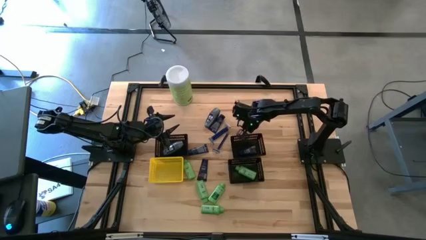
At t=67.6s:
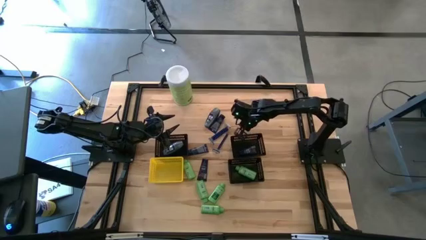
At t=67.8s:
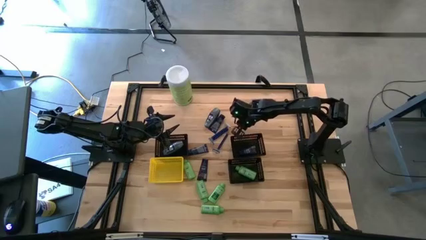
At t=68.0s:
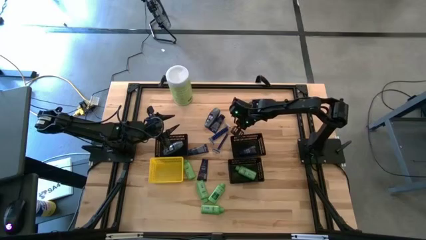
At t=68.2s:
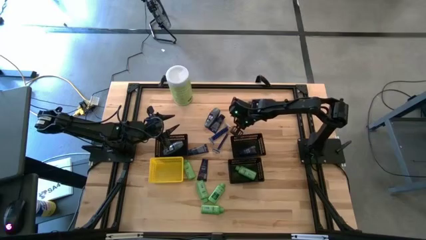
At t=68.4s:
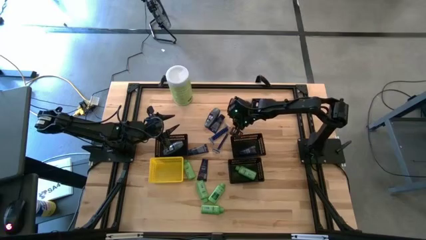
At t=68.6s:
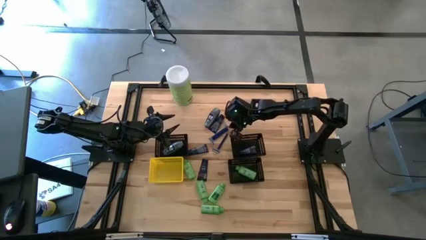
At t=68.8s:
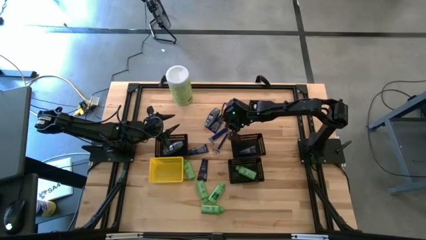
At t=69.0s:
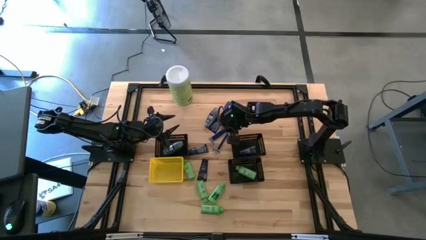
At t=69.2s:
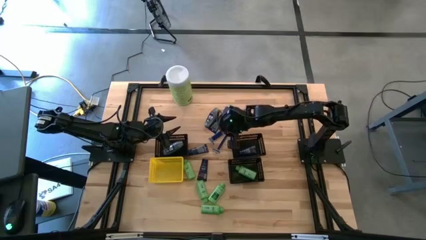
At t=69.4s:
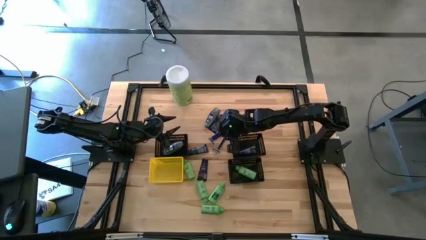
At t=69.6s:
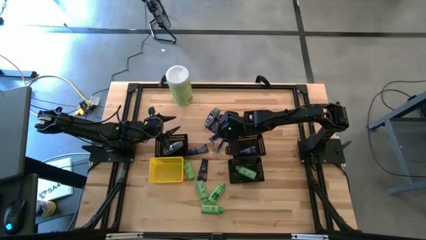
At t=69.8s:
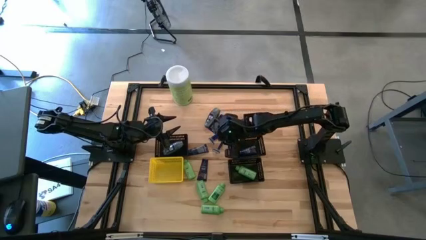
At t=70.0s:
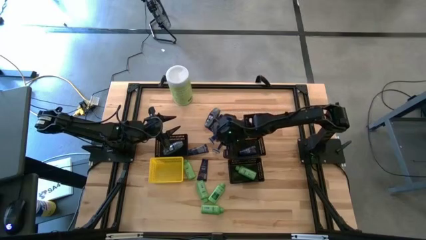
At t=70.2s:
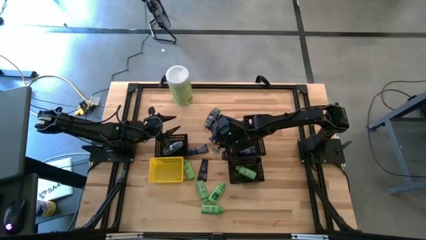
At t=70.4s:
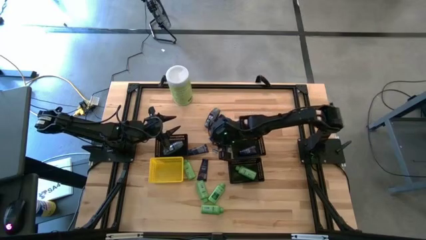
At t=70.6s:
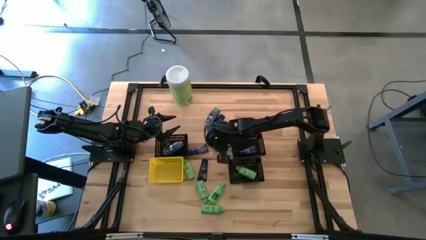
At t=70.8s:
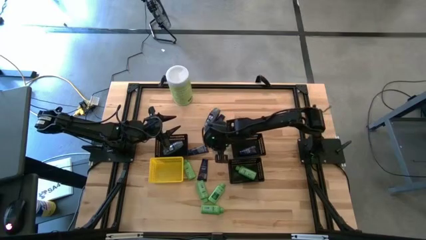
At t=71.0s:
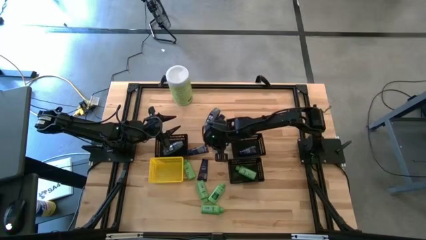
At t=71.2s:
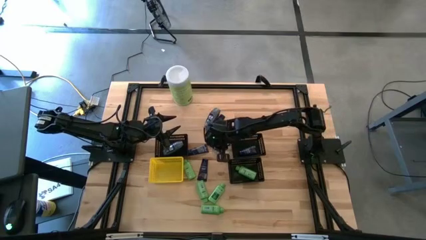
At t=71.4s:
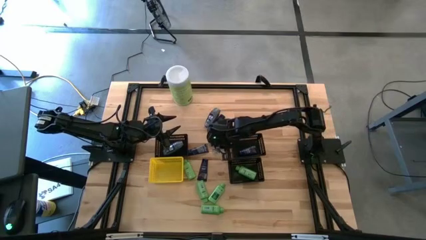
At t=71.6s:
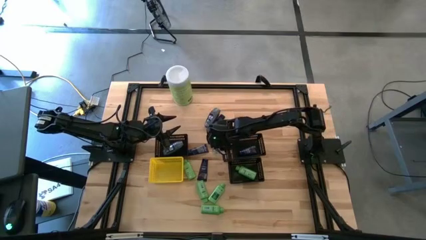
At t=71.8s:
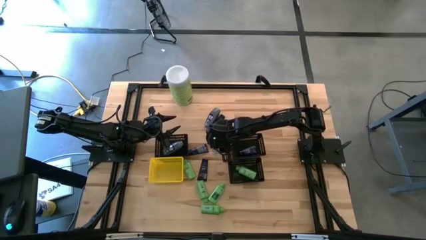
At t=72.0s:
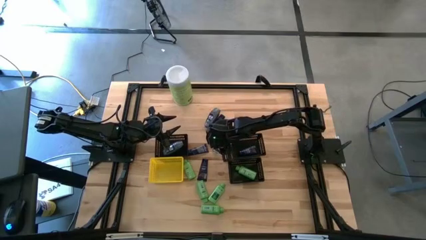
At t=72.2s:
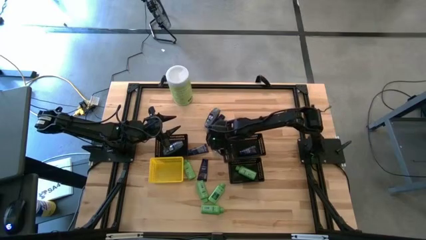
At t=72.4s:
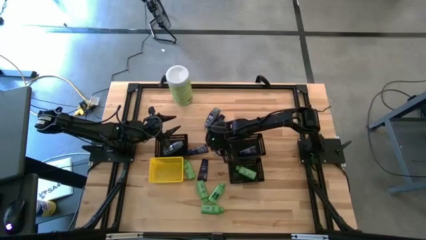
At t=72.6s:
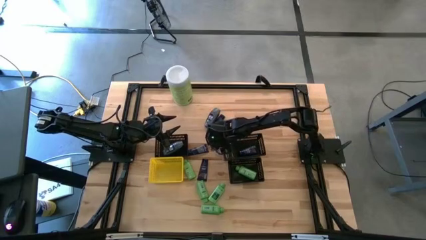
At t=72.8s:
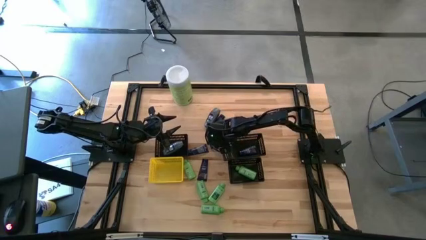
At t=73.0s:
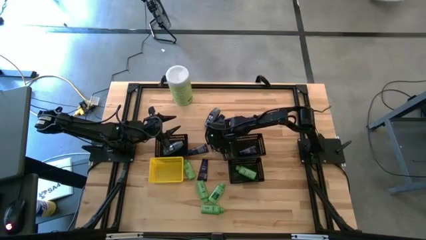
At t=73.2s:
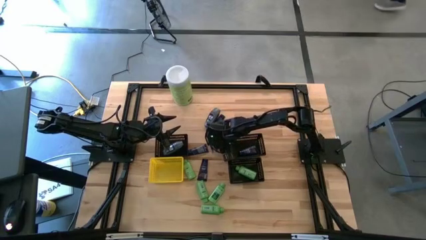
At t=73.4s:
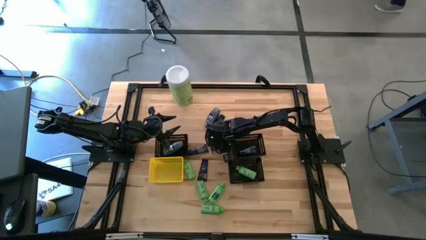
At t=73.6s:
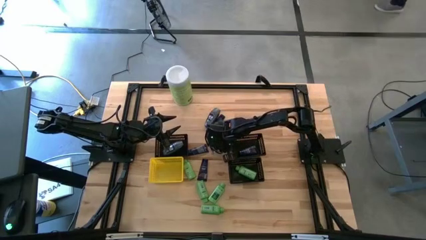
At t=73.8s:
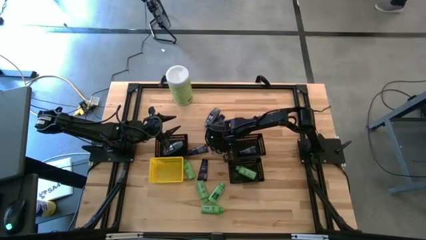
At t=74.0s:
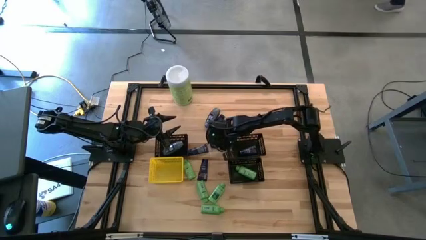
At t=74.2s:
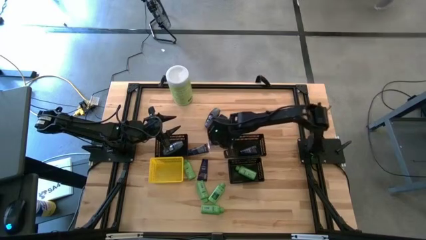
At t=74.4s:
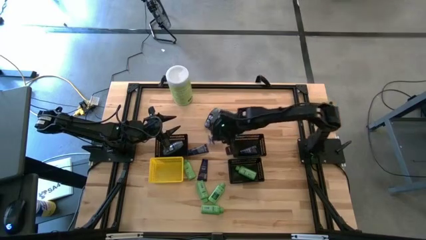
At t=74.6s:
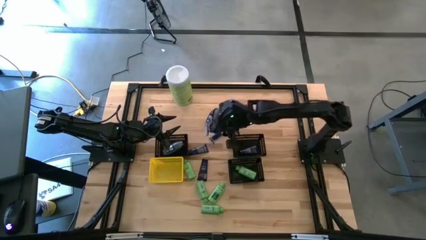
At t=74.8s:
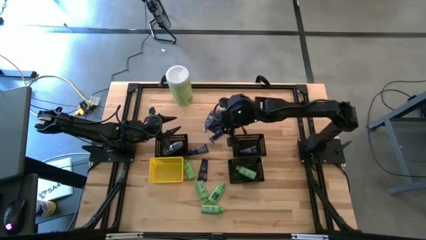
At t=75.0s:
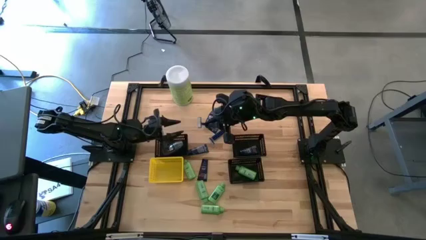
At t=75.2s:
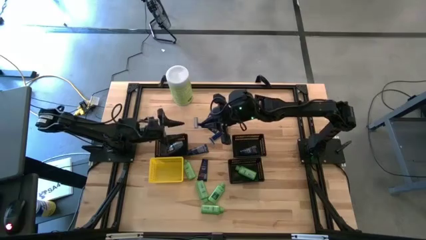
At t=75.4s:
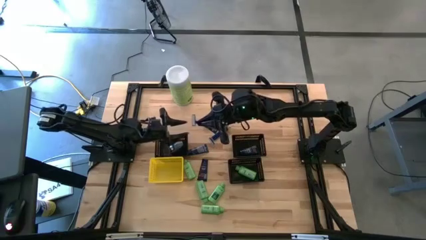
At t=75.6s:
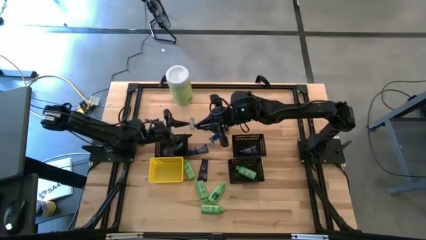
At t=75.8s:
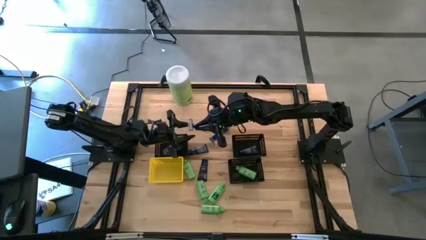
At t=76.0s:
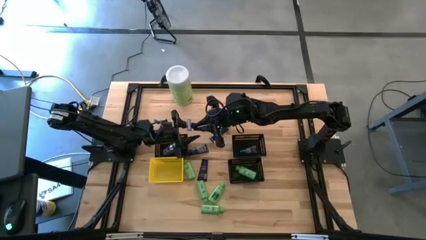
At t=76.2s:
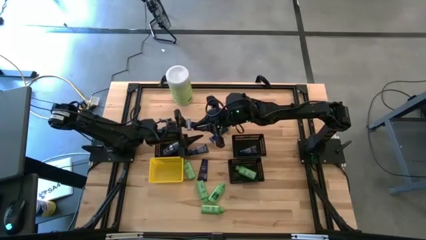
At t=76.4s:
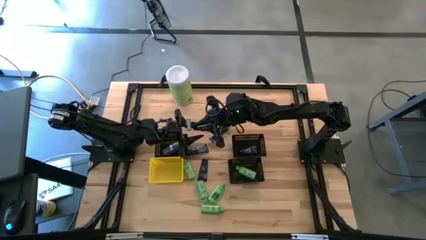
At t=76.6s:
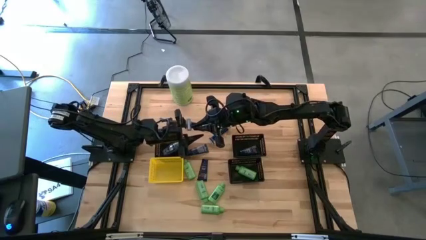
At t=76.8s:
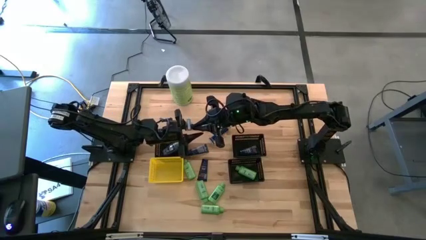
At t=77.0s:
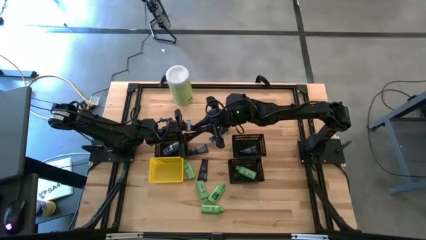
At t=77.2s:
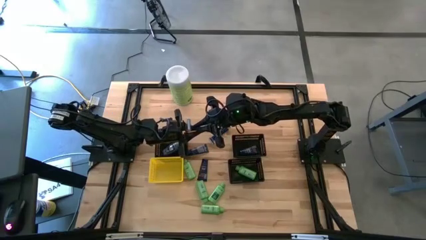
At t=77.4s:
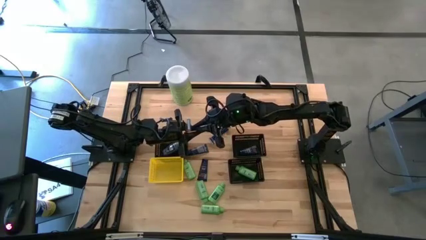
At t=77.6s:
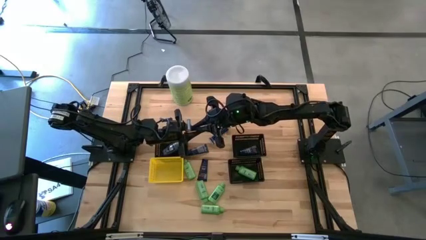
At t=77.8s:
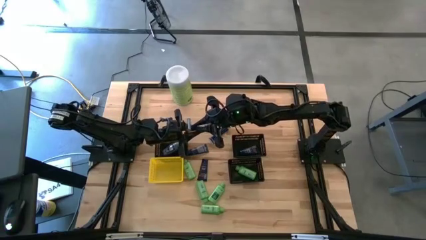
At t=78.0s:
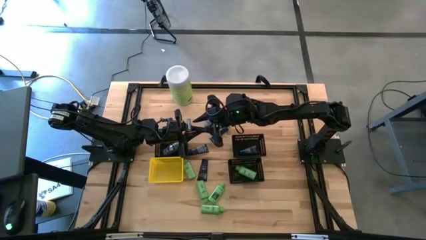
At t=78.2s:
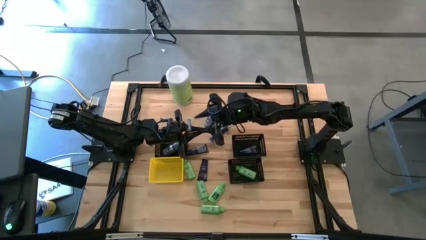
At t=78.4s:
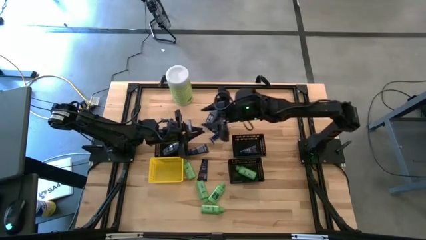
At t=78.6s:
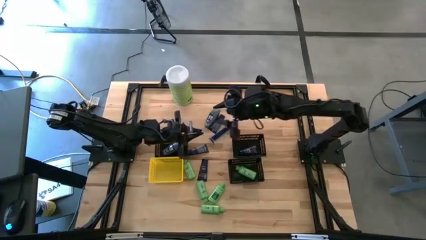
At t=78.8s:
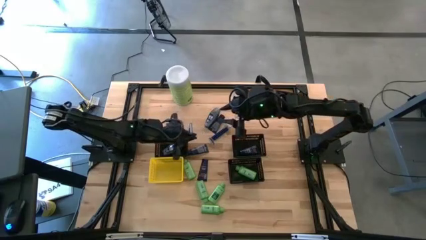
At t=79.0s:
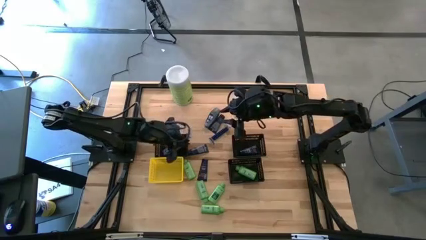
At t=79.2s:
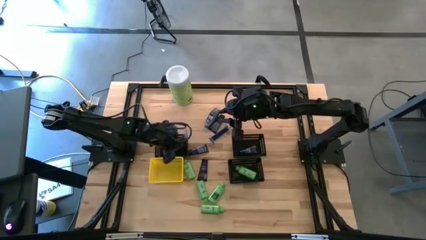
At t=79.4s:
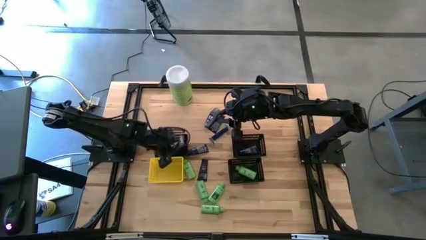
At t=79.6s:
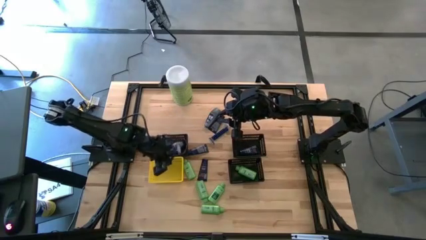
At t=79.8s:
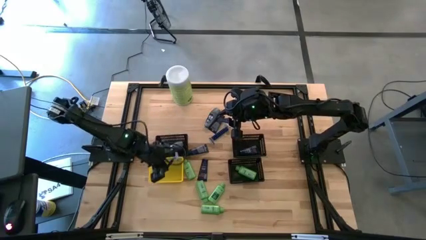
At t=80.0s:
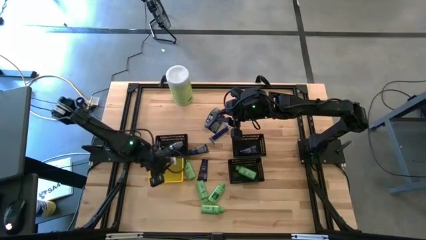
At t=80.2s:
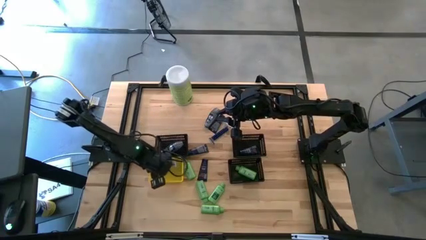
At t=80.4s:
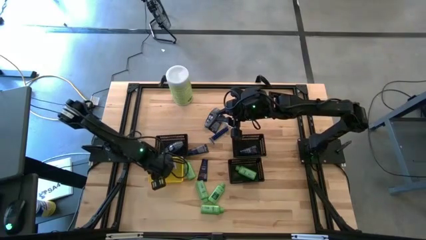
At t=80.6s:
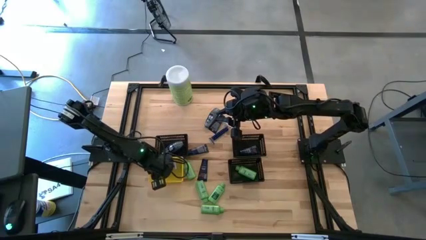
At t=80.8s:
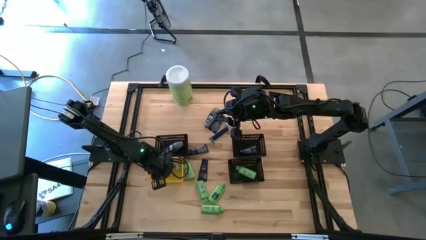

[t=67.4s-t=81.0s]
Task: Pick & Place Travel size toiletries
Put the bottom blue razor into the yellow bin
